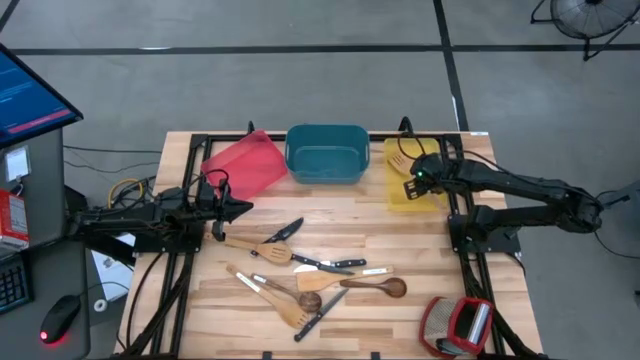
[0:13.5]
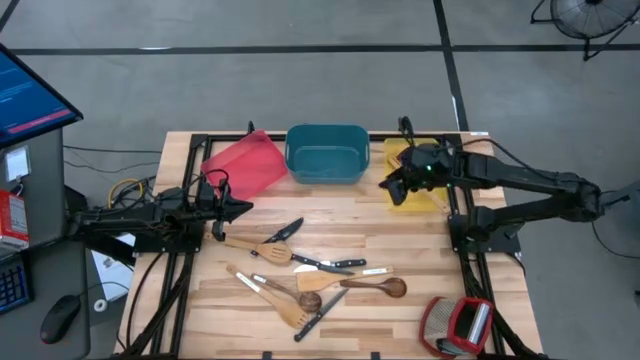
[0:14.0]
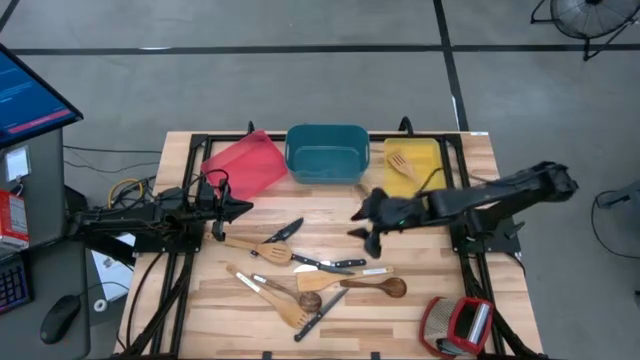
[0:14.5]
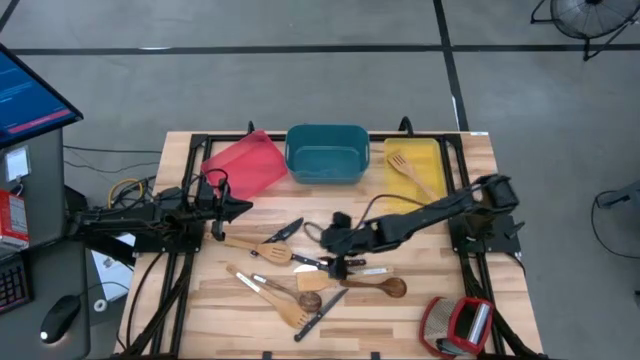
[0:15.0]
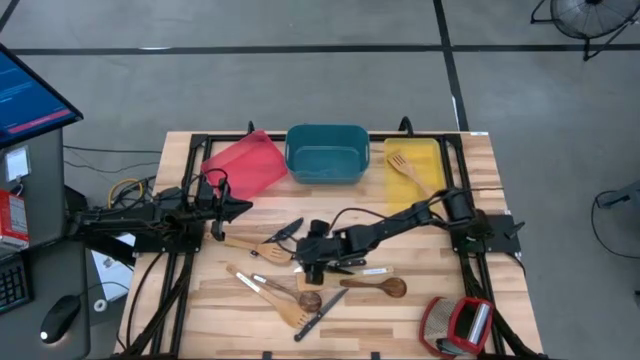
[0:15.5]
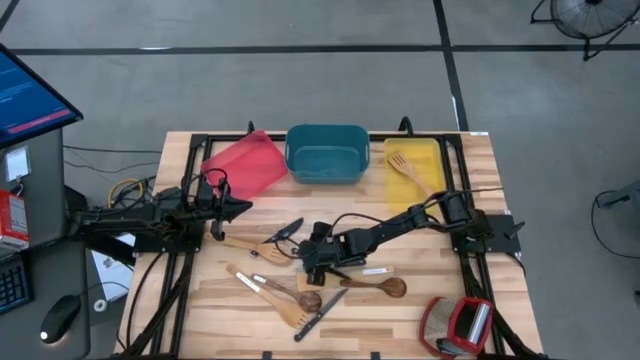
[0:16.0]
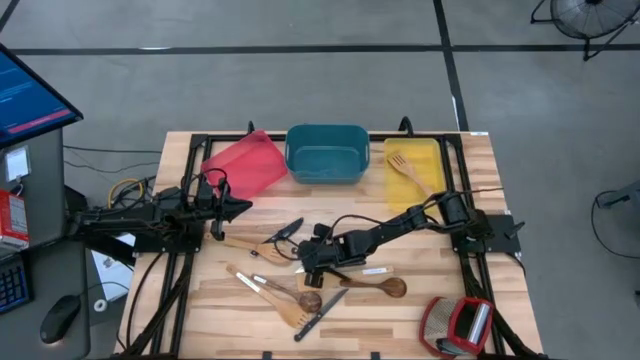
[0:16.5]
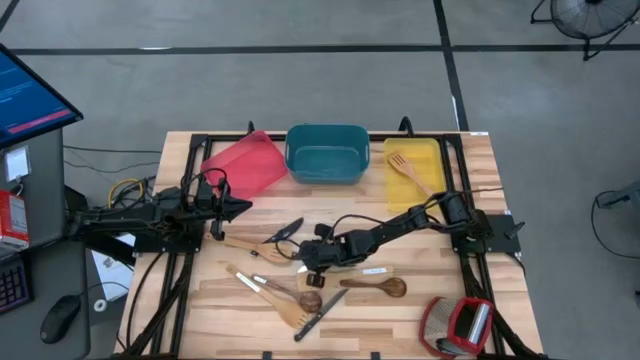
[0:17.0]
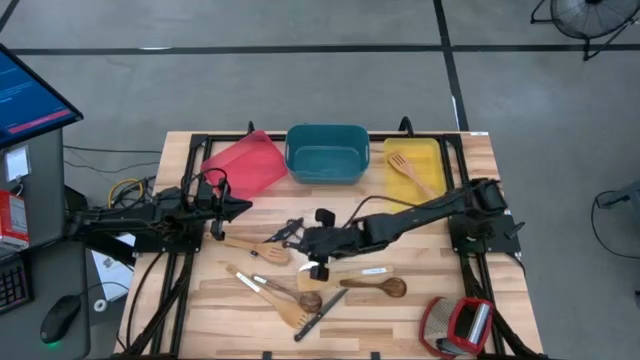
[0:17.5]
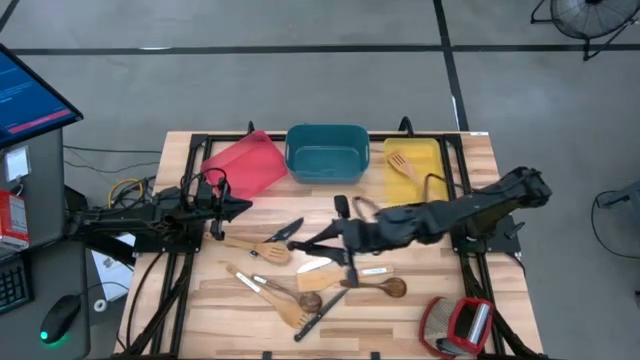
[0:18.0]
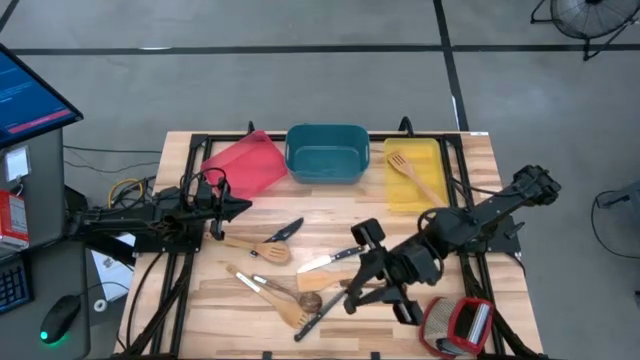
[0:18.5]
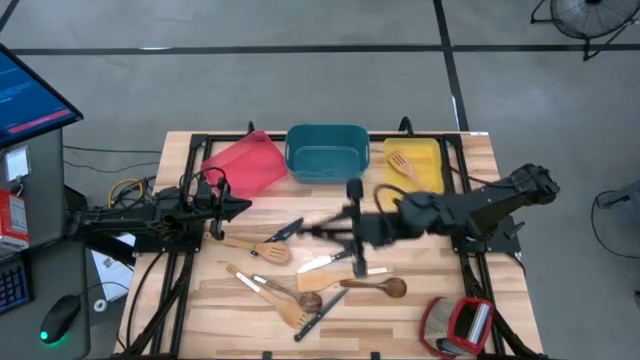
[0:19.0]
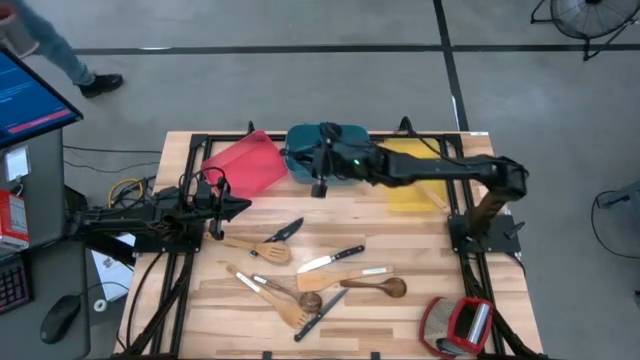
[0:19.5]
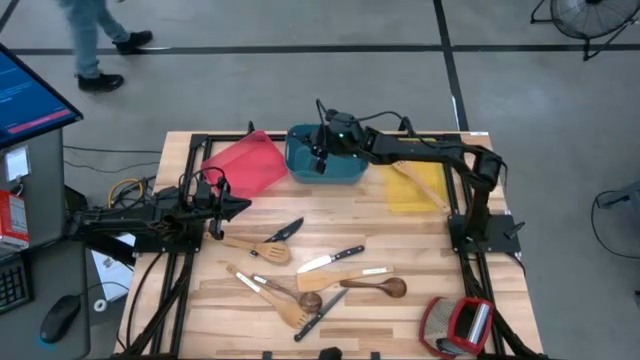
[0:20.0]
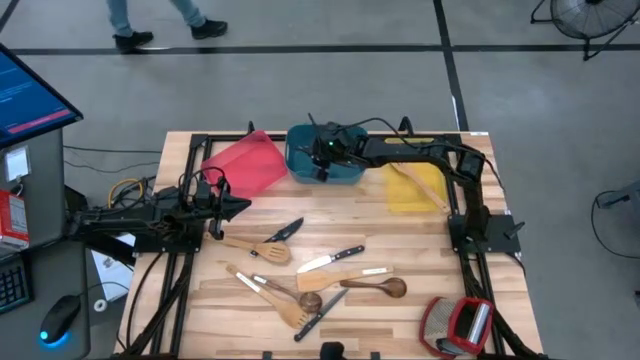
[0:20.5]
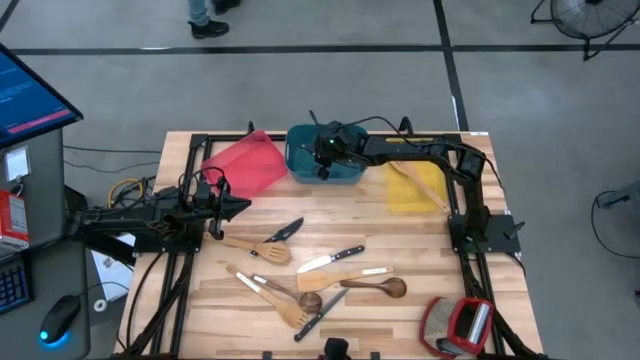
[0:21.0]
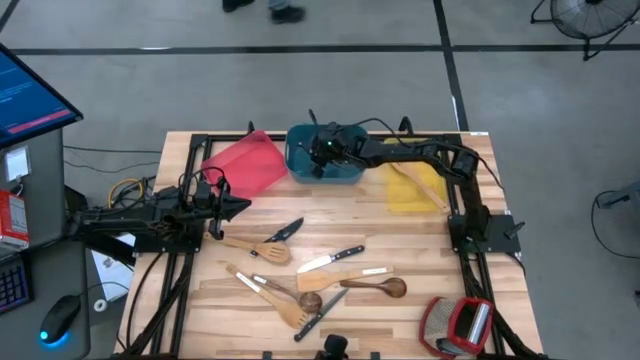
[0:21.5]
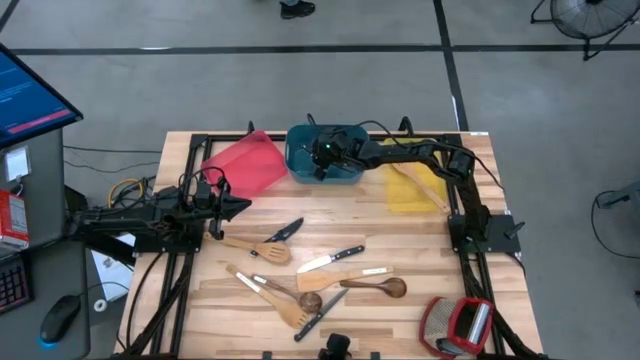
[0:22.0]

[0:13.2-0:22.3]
Task: Pick & Place Kitchen Items
Put the black knife into the blue bin

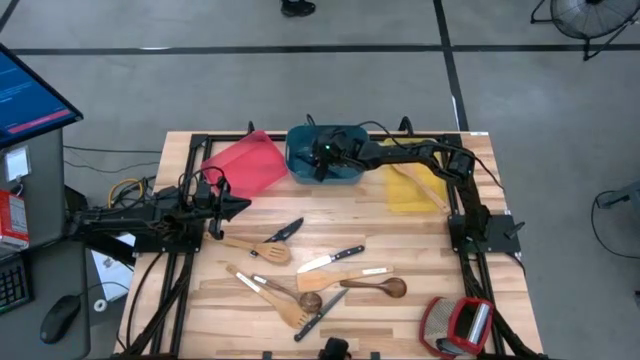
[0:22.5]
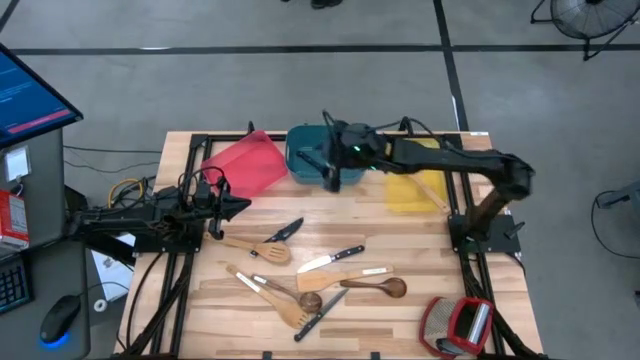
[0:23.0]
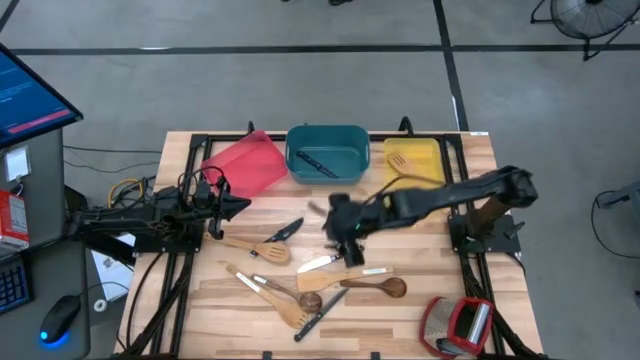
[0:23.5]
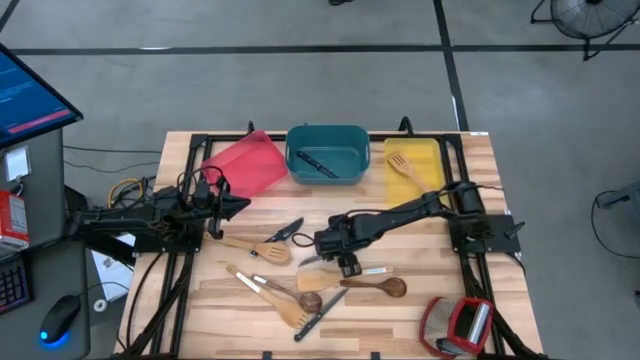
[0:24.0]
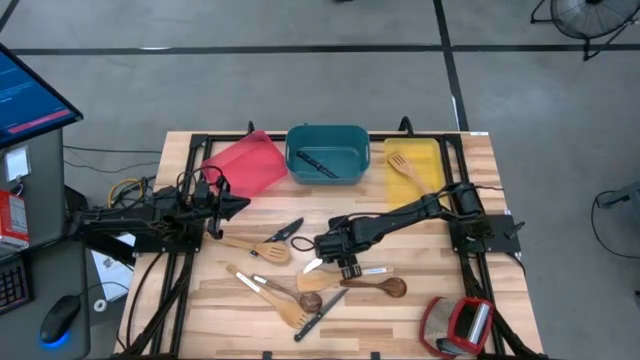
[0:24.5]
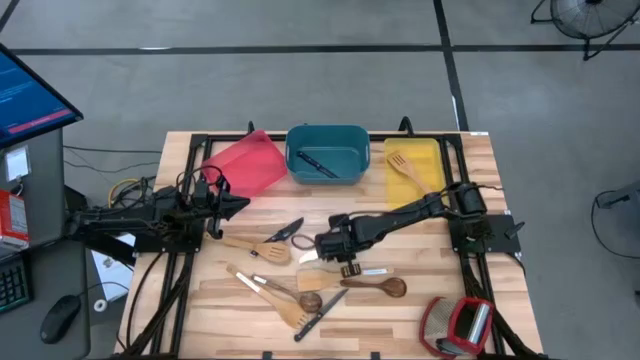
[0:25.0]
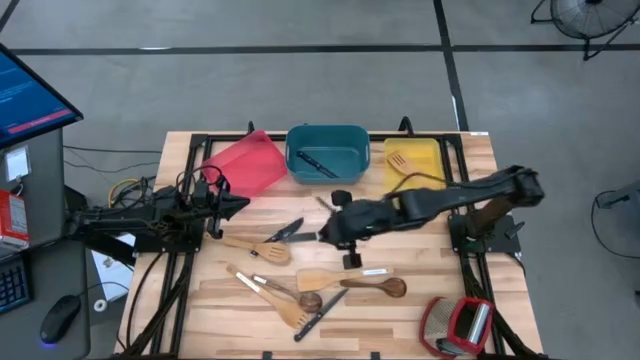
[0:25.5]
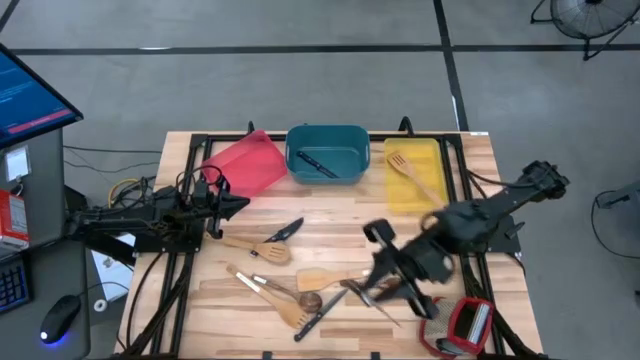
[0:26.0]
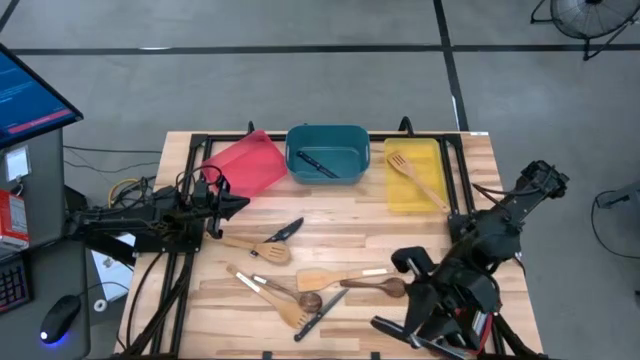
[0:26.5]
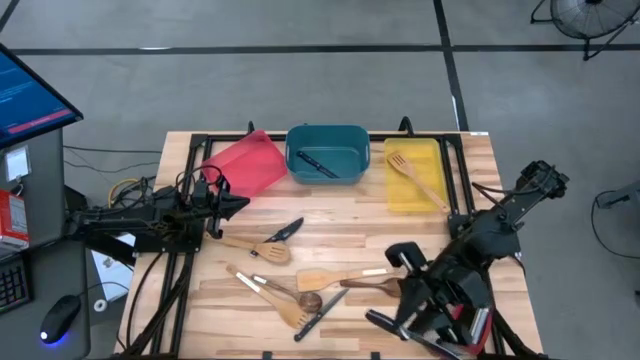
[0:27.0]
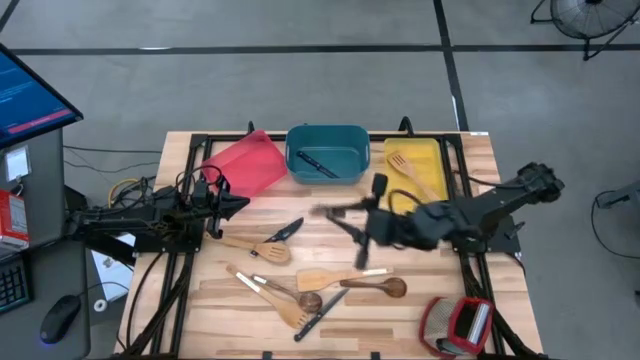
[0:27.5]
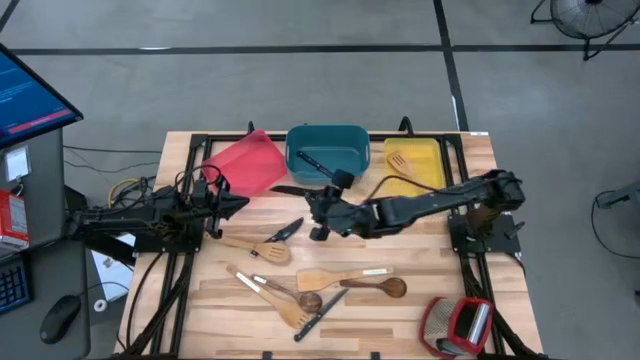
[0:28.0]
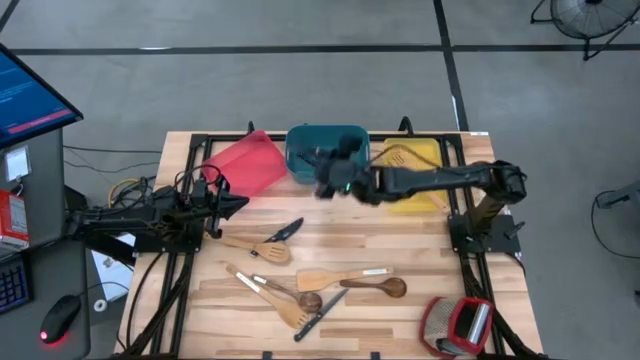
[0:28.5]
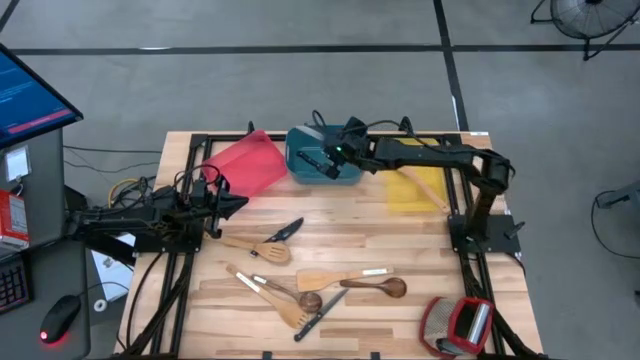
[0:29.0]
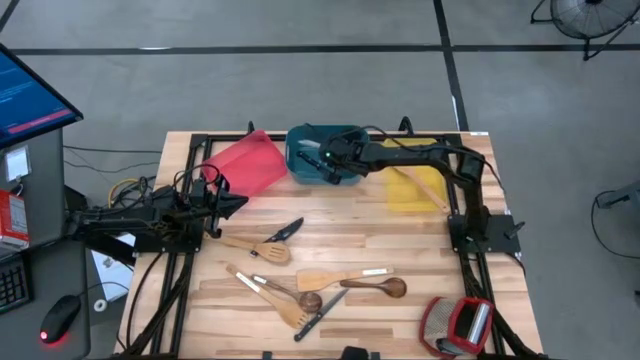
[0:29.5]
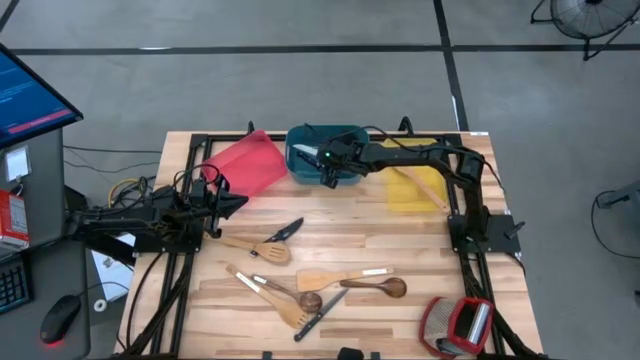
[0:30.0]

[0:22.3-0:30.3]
Put the black knife into the blue bin

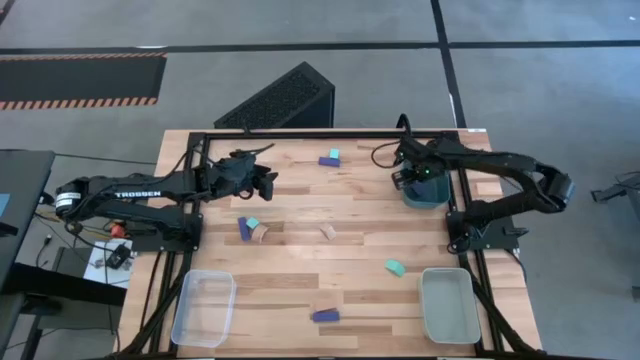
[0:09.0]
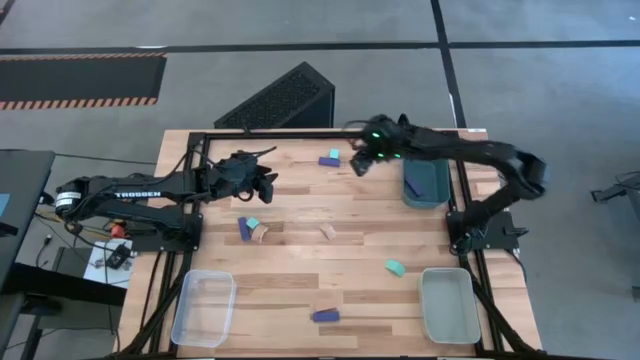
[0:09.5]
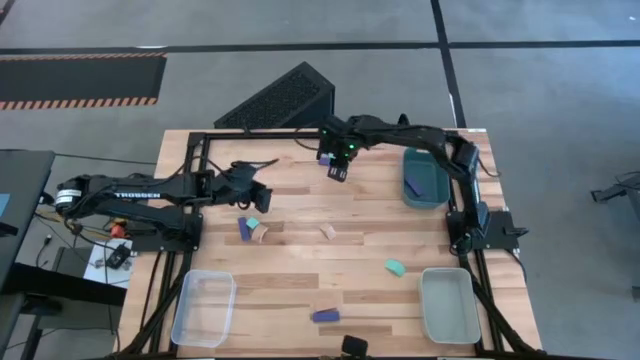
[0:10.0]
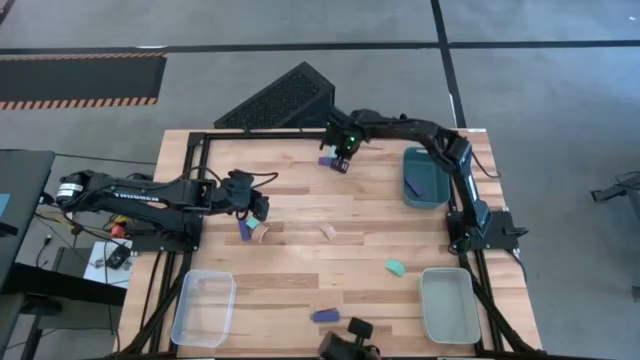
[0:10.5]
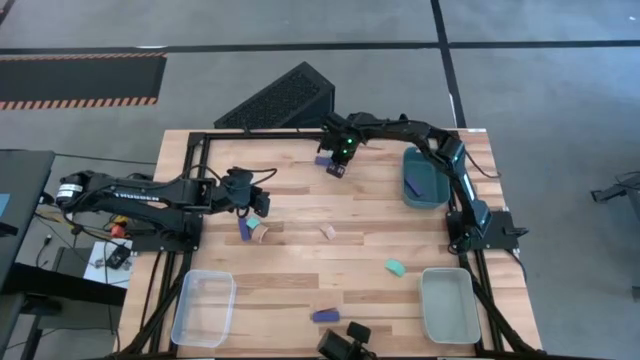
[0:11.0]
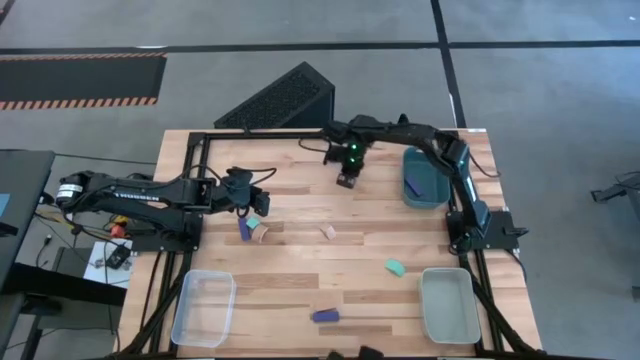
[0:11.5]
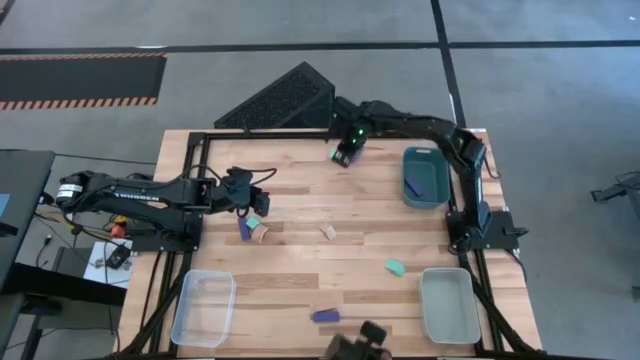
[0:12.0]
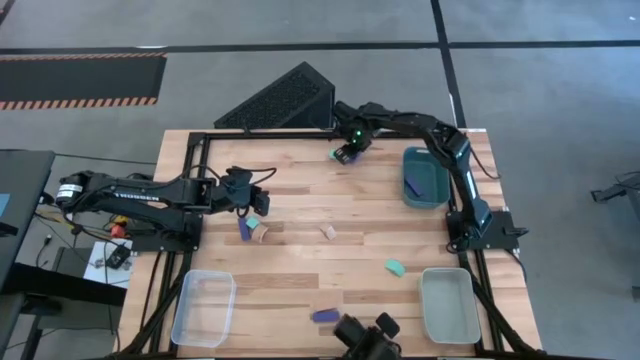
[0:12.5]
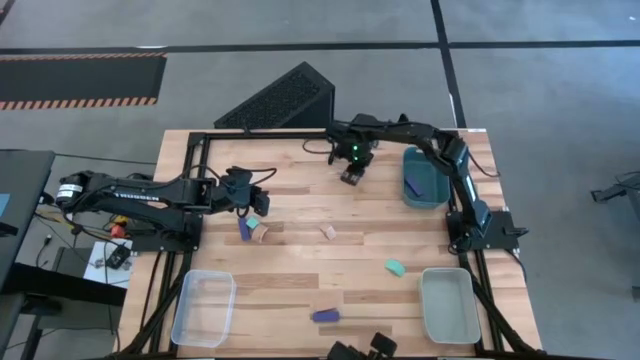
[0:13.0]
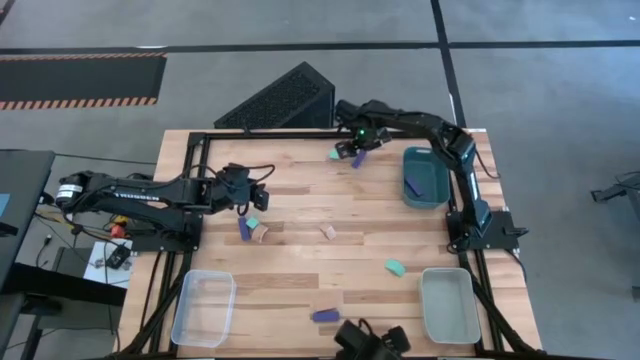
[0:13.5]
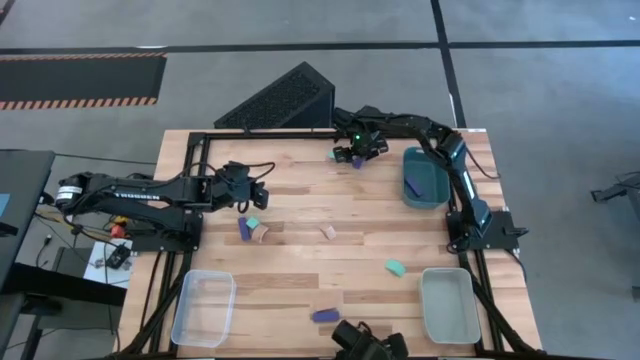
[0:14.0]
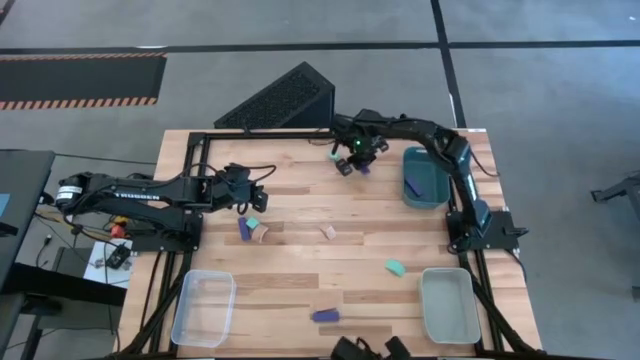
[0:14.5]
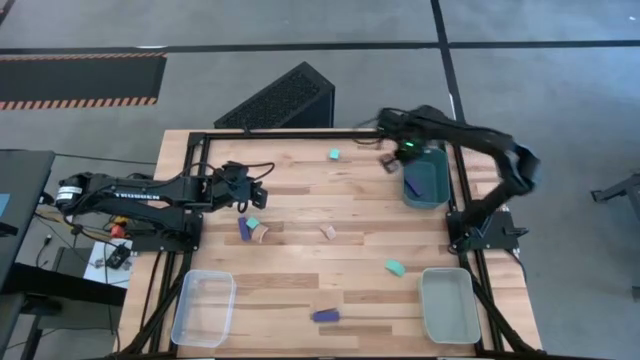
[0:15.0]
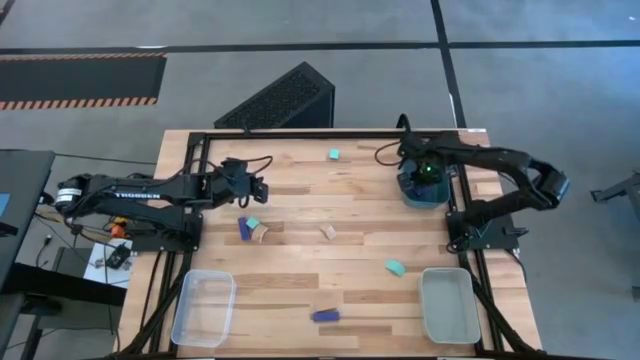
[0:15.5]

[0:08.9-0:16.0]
Task: Sort & place blocks by color
Put the blue block into the green bin
